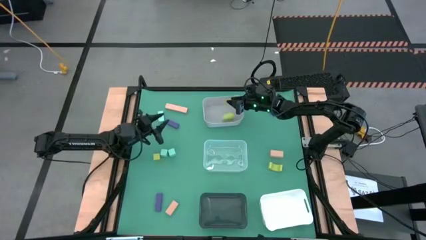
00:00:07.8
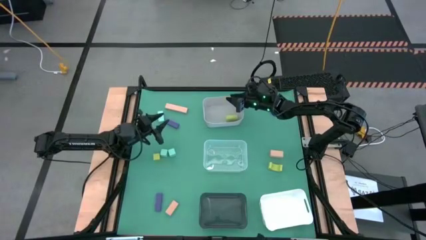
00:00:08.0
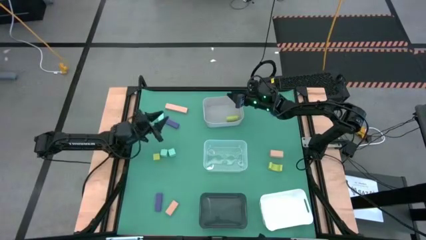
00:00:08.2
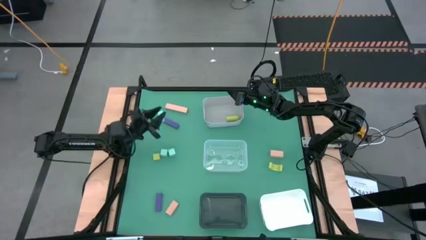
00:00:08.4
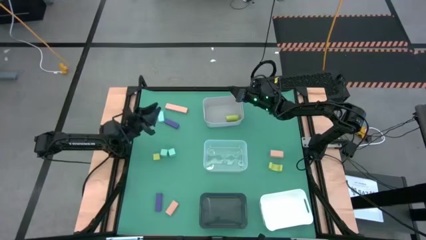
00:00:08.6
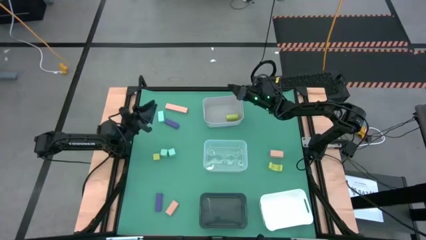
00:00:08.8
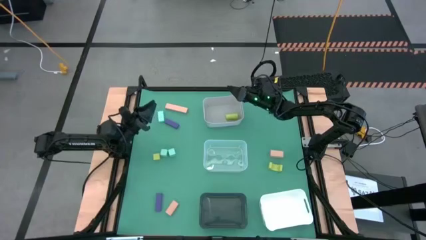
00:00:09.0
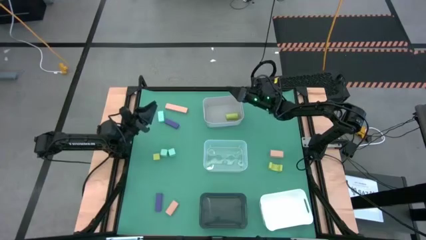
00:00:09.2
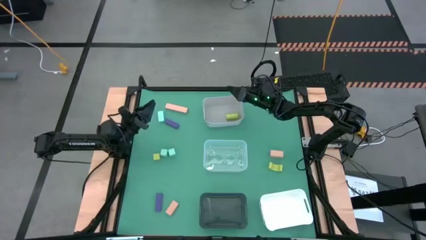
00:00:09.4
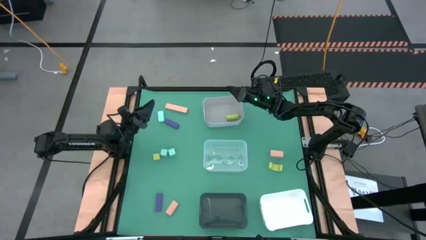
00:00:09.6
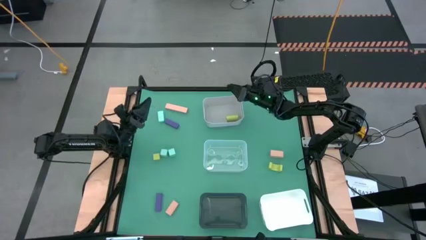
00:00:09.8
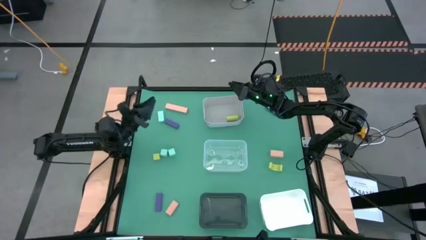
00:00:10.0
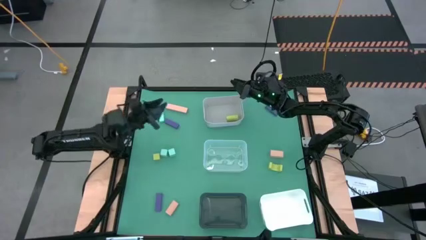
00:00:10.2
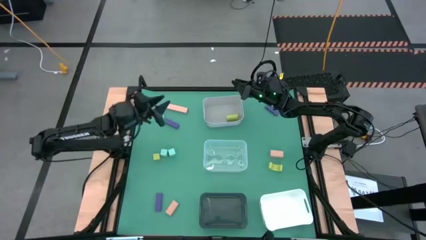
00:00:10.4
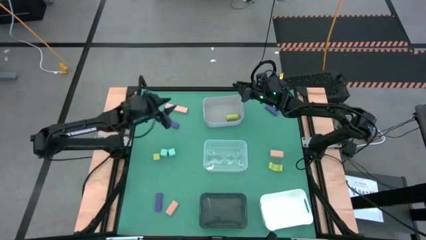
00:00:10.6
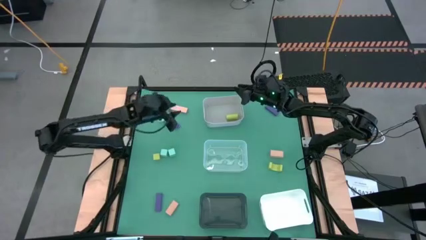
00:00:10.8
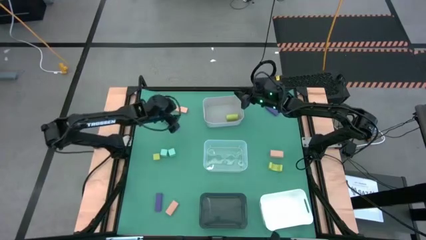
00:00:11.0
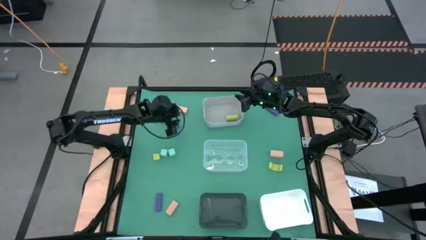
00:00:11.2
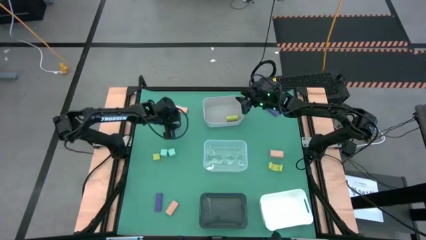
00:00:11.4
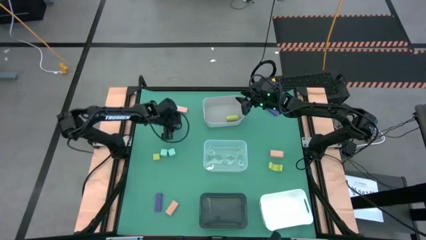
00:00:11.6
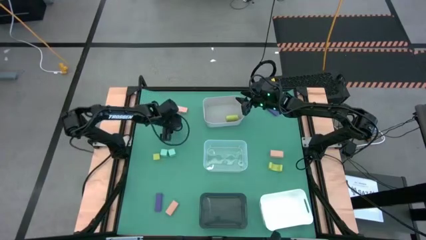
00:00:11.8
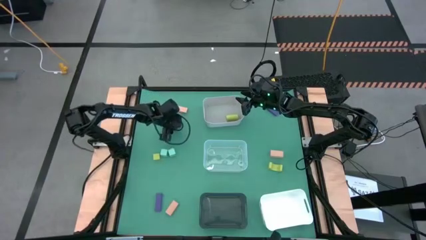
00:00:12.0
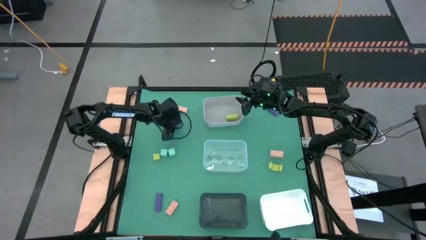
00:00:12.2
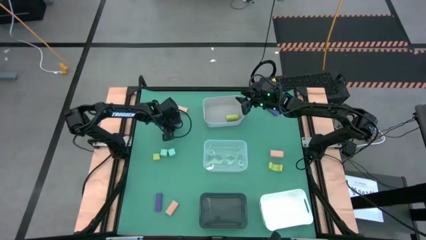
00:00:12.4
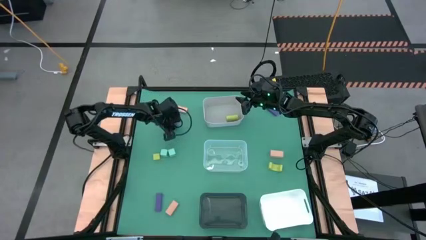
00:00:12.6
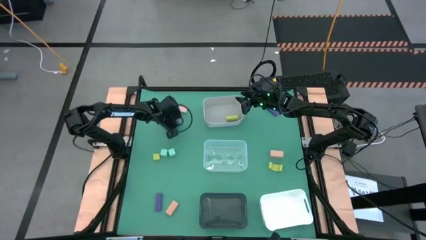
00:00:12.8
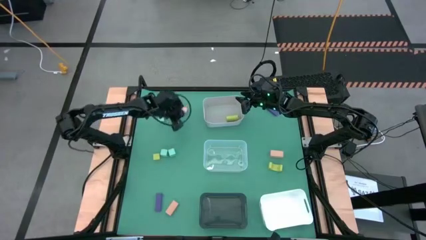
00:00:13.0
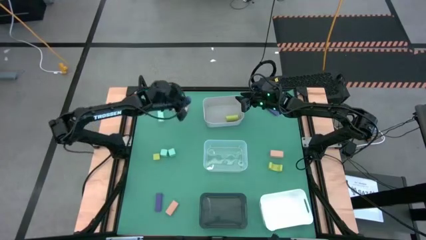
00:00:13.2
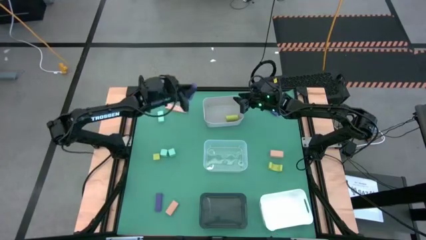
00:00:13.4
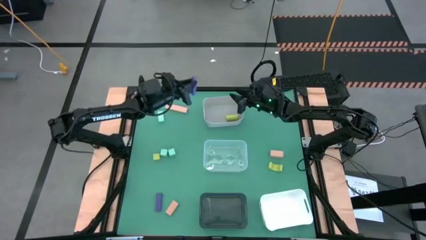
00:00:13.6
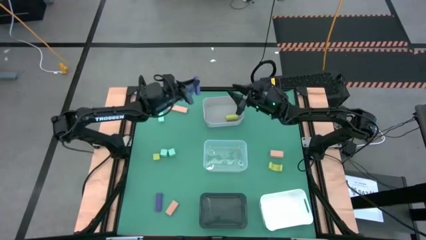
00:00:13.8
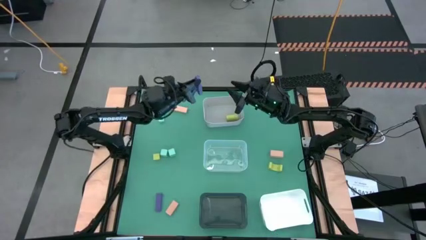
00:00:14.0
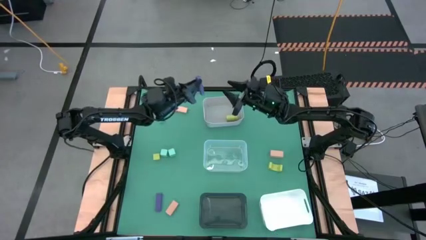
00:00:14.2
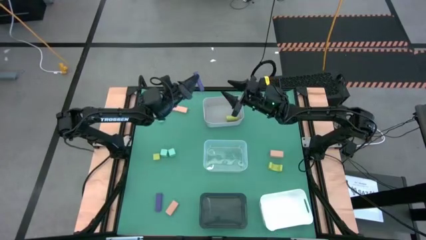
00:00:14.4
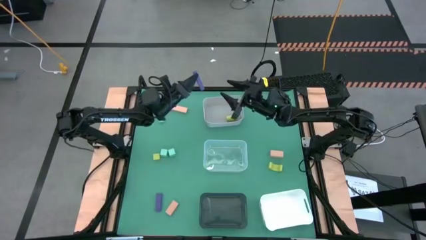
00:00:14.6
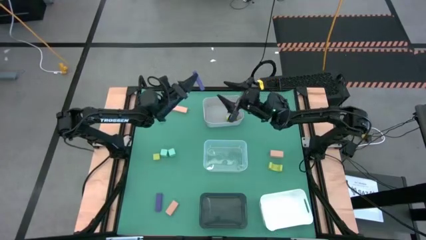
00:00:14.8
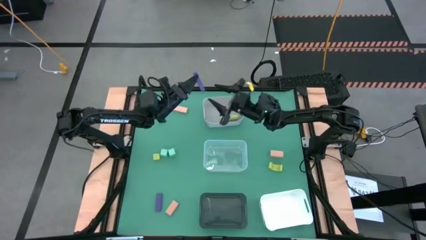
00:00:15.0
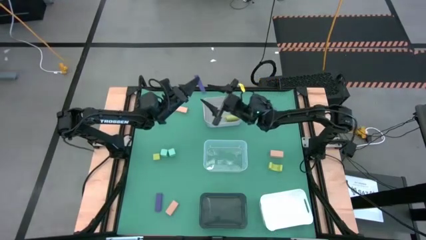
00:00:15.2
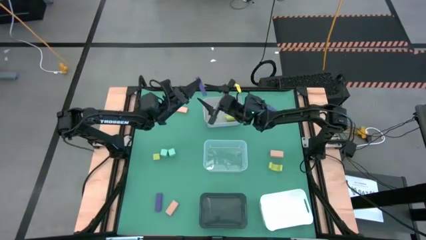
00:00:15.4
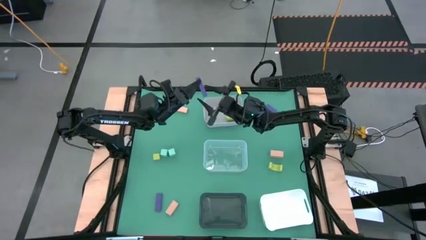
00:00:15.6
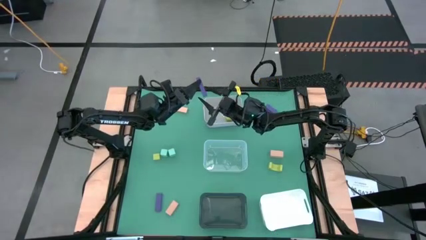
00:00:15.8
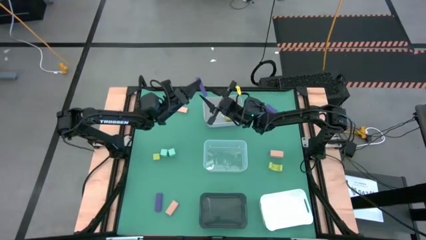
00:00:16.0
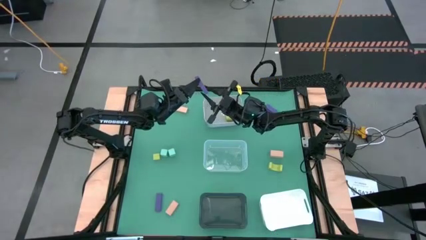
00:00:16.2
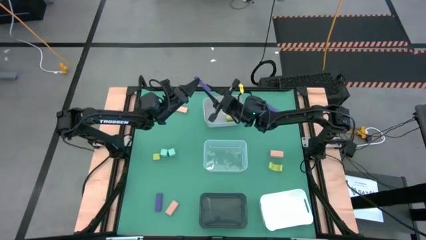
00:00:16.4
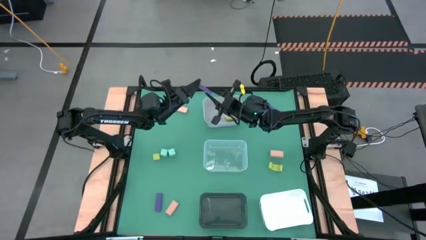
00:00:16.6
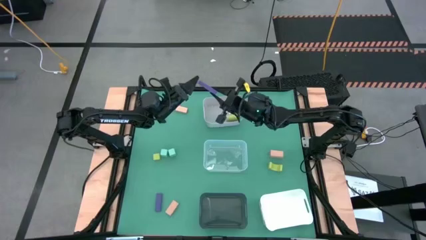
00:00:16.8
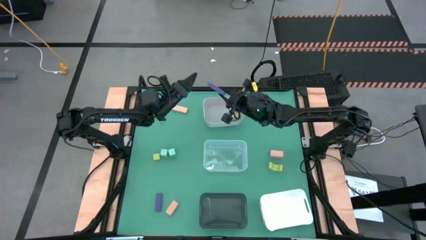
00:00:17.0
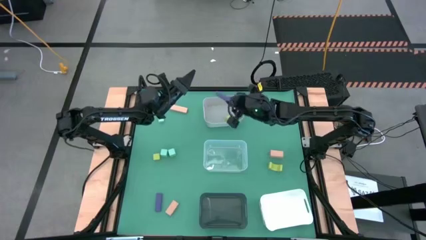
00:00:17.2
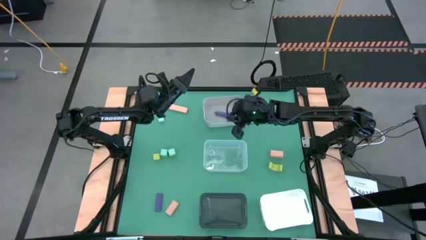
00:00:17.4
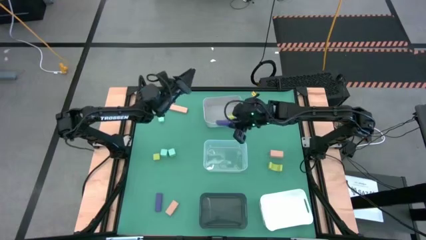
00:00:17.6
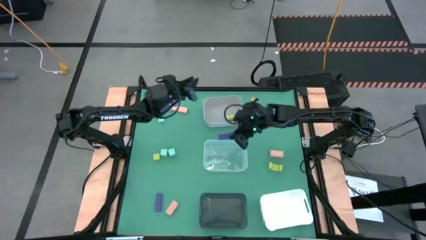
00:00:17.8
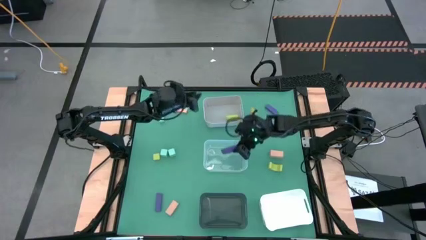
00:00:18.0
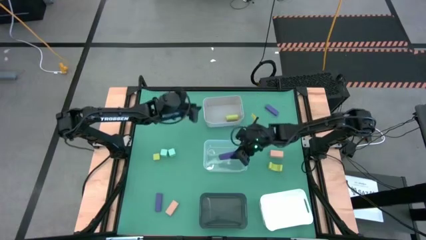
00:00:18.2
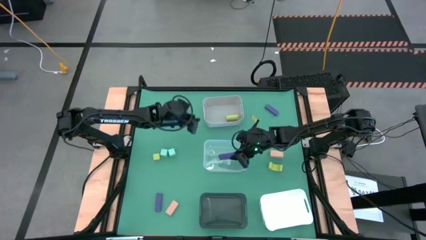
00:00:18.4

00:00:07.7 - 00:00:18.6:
Task: Sort & place blocks by color
Put the top left violet block into the transparent bin

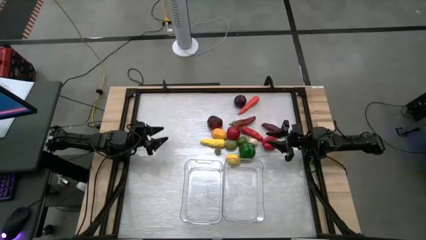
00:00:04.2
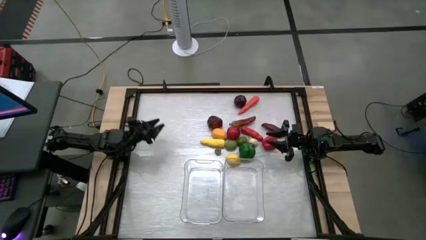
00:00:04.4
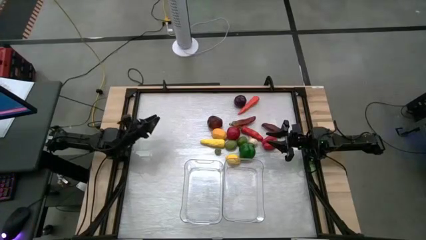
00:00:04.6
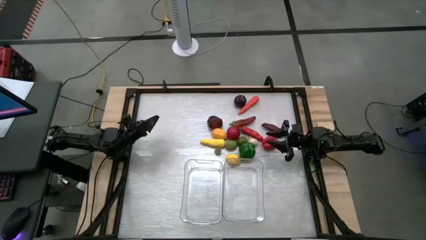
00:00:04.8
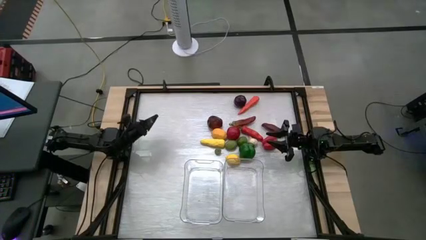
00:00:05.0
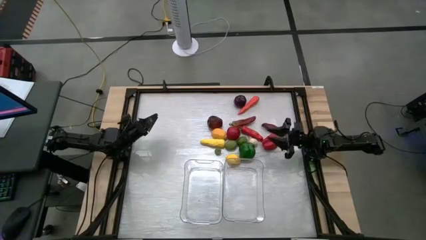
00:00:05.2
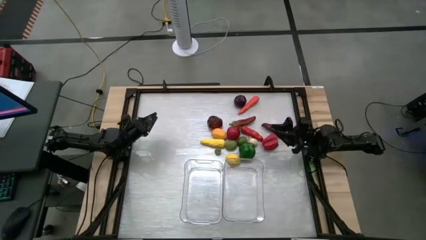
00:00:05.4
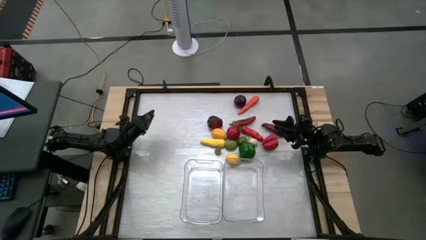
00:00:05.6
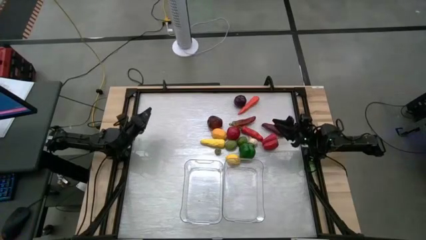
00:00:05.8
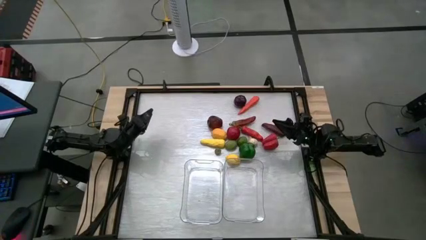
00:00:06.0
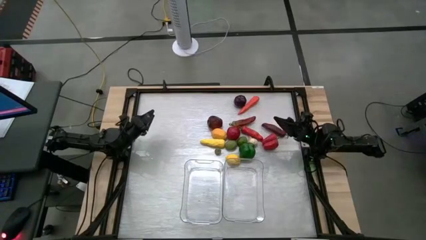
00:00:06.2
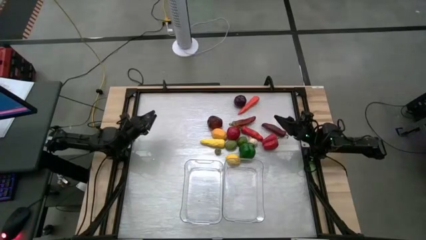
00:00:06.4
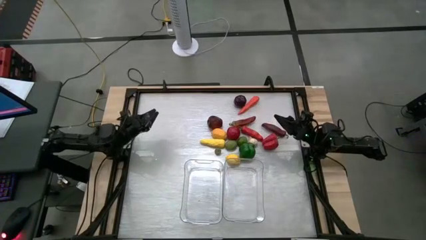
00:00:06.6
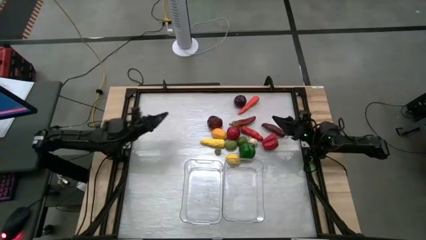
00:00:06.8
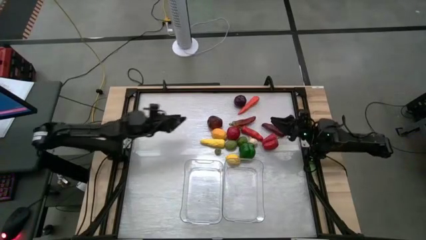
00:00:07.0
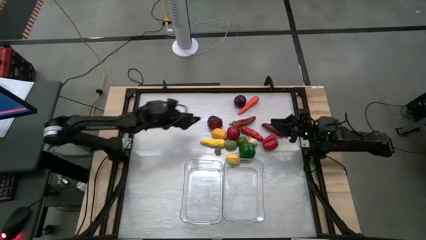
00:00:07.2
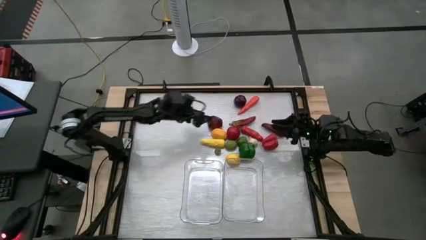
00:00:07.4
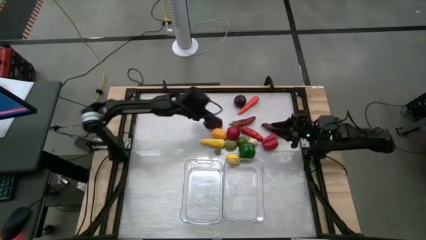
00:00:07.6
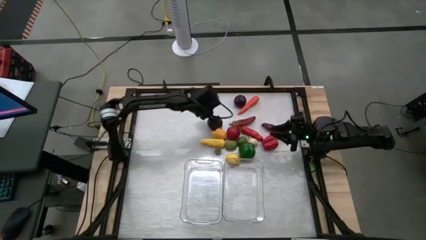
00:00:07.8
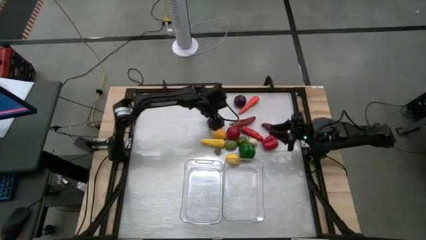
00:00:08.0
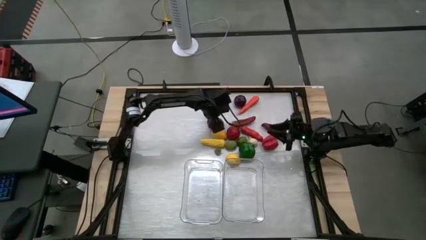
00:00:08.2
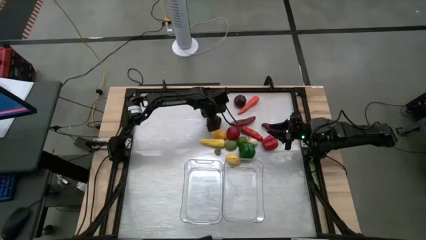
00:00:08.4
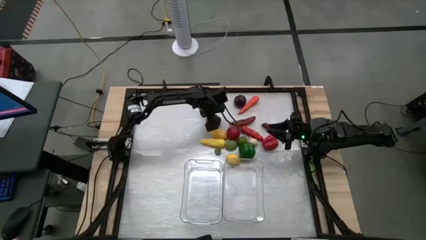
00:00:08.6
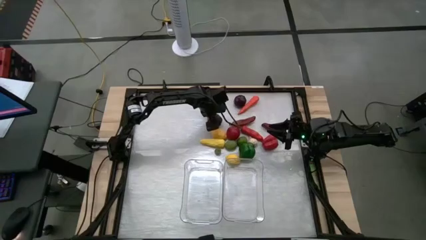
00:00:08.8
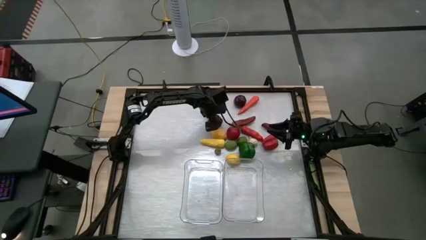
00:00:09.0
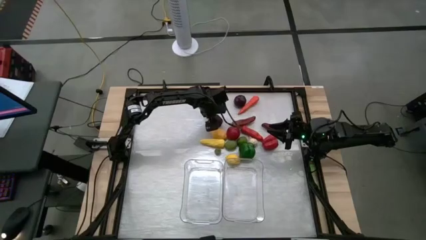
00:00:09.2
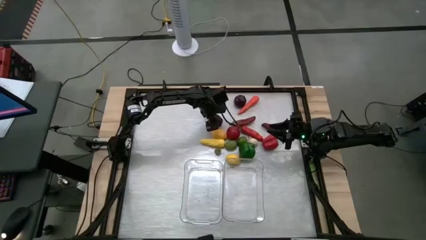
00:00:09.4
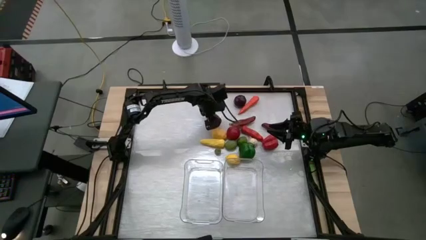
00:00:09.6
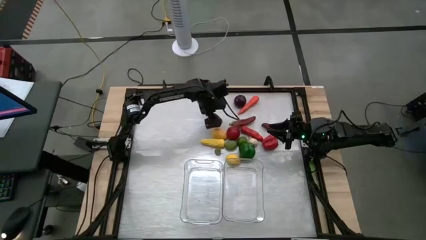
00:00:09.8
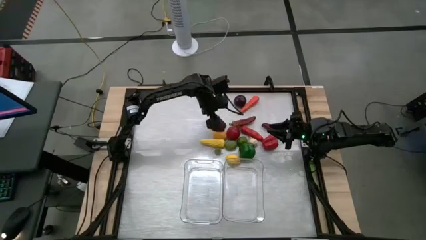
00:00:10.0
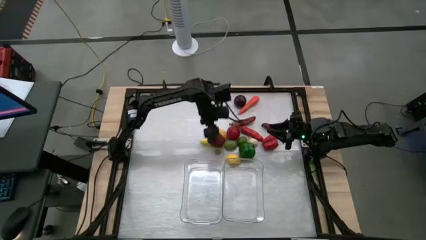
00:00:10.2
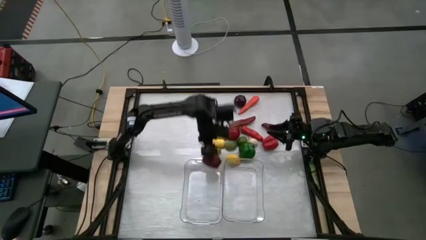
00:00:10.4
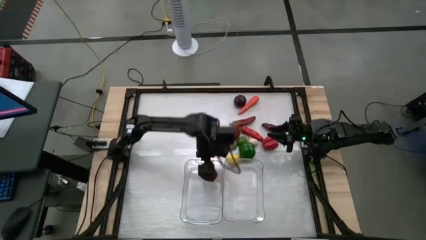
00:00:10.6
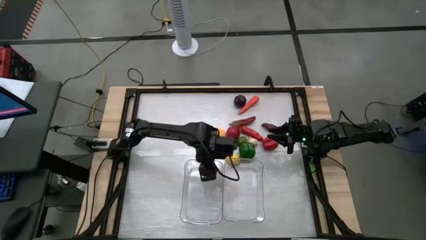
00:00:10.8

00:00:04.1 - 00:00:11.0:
Task: Sort produce into baskets
Put the apple into the left transparent bin
